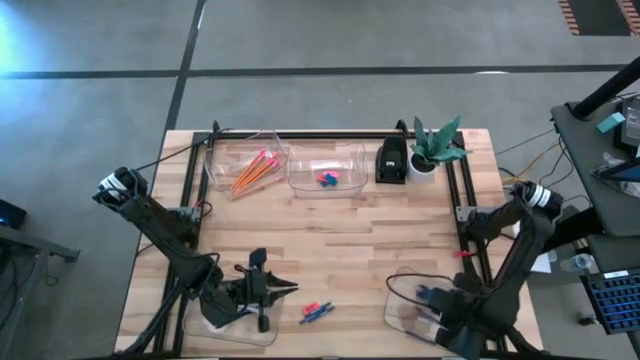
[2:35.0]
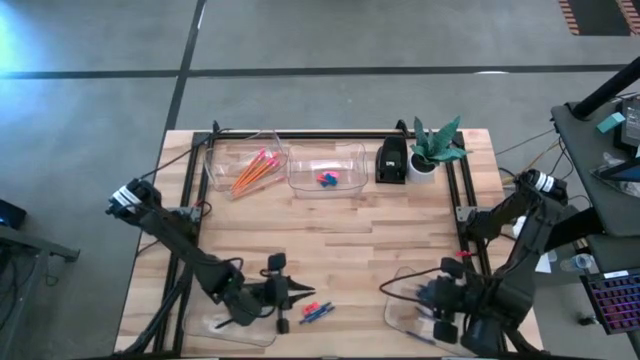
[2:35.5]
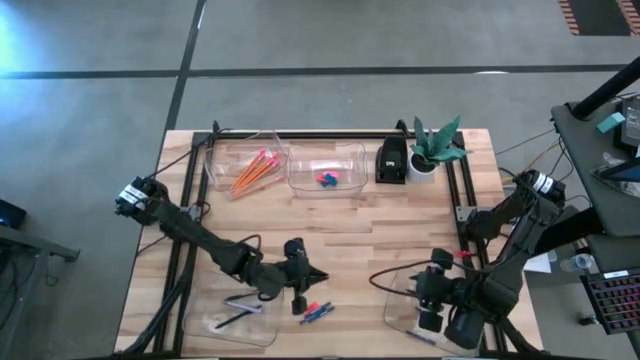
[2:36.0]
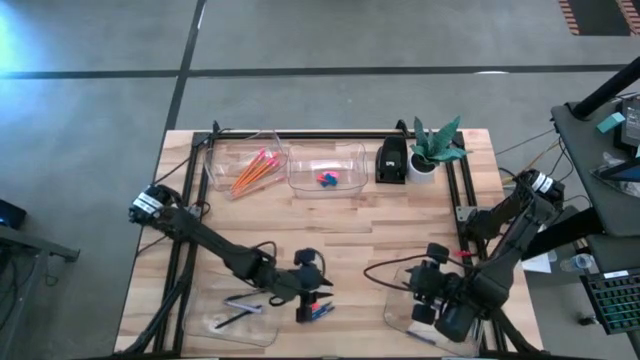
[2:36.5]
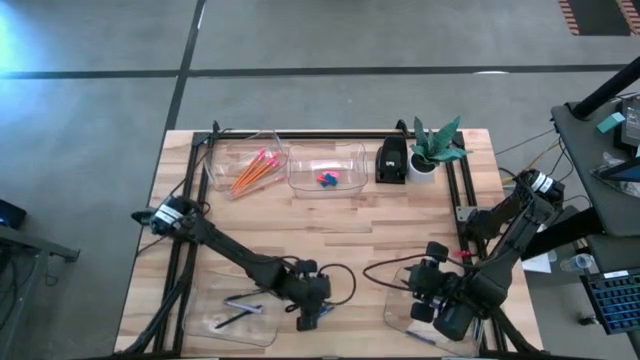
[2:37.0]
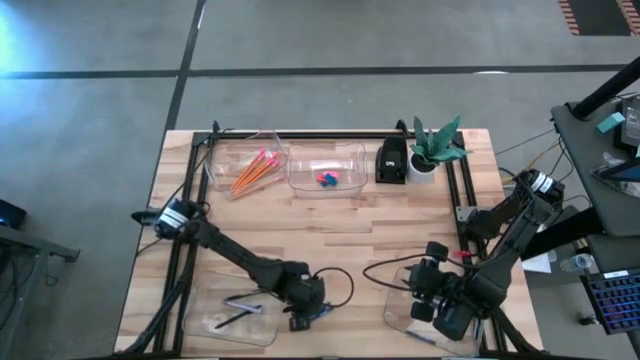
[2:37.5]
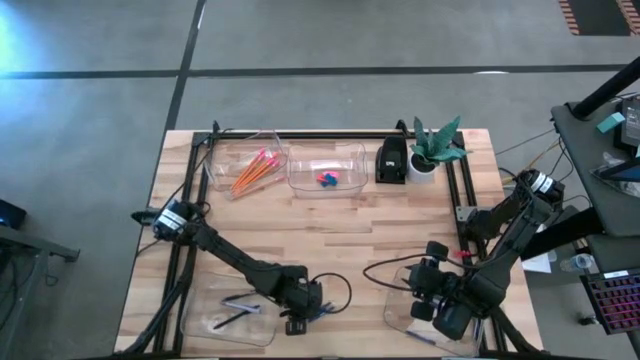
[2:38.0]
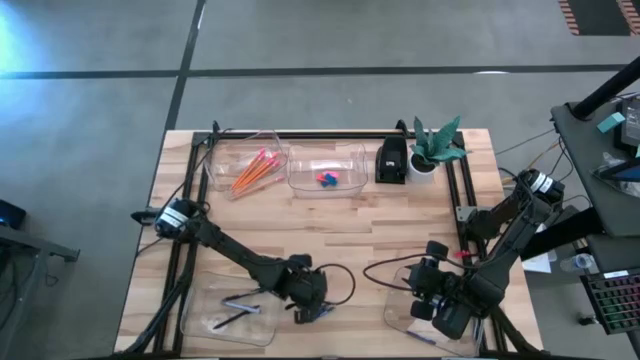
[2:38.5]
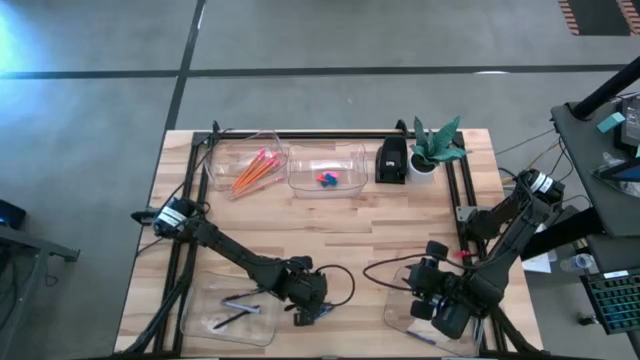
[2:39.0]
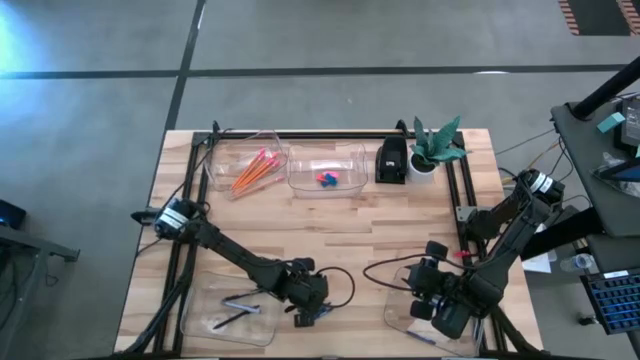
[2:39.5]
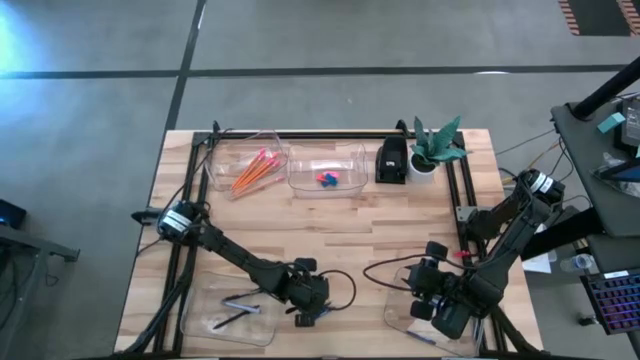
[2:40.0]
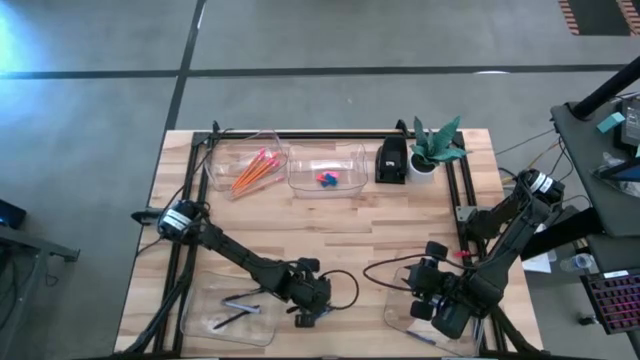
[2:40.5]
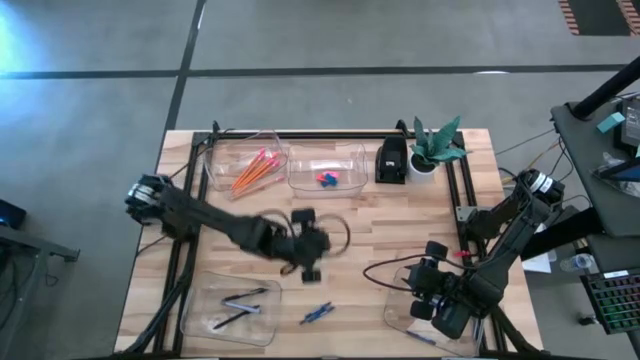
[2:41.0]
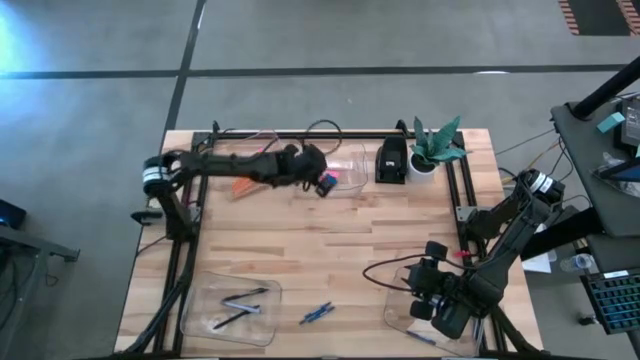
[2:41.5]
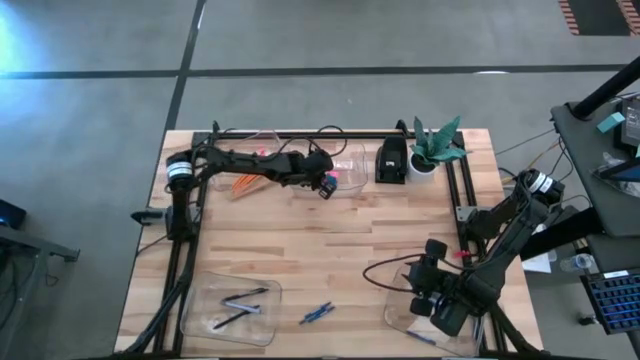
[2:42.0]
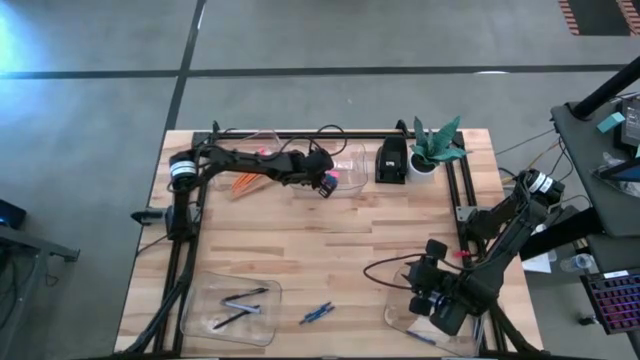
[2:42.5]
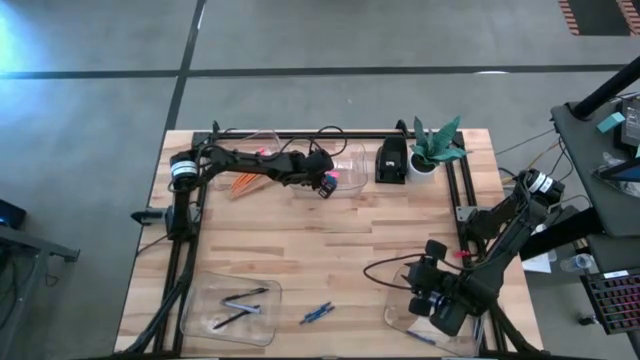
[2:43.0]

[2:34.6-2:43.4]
Task: Sort crayons/erasers/pens/pencils in bins
Put the orange eraser into the top right transparent bin

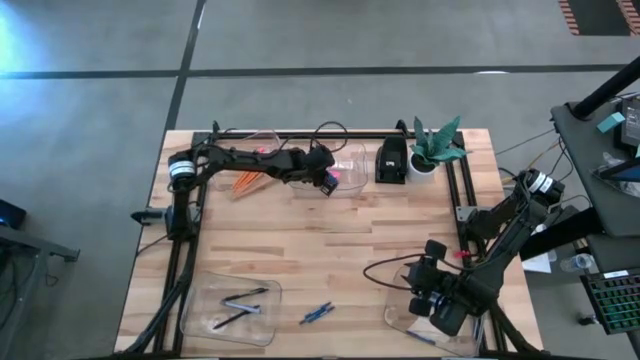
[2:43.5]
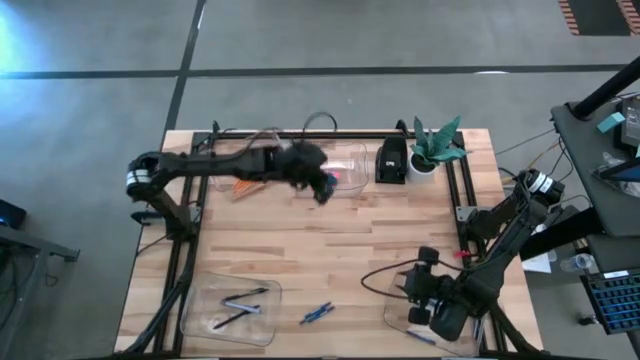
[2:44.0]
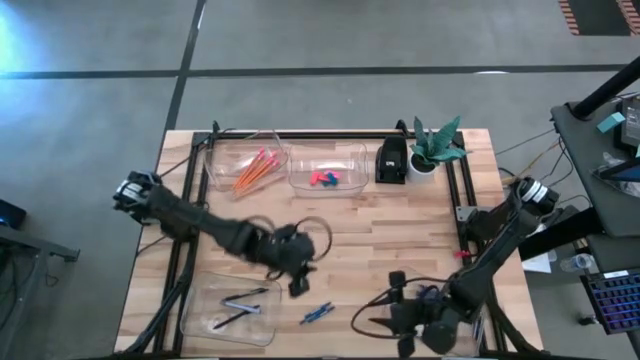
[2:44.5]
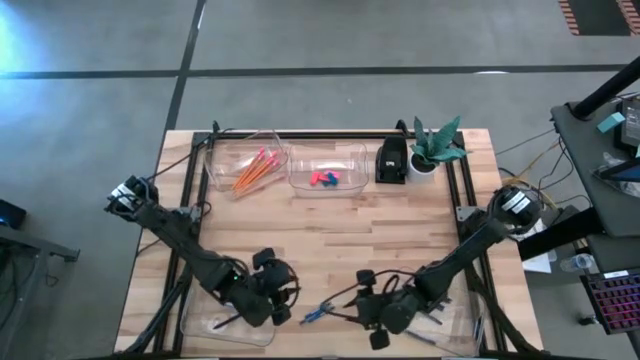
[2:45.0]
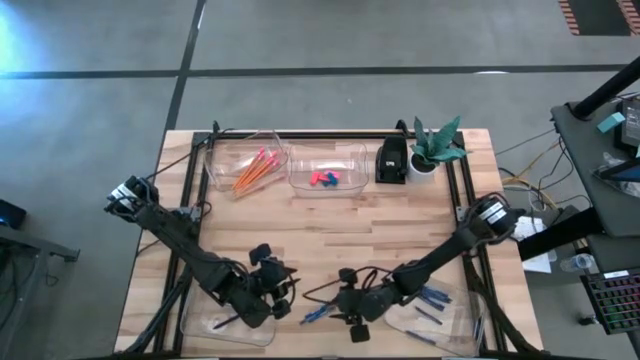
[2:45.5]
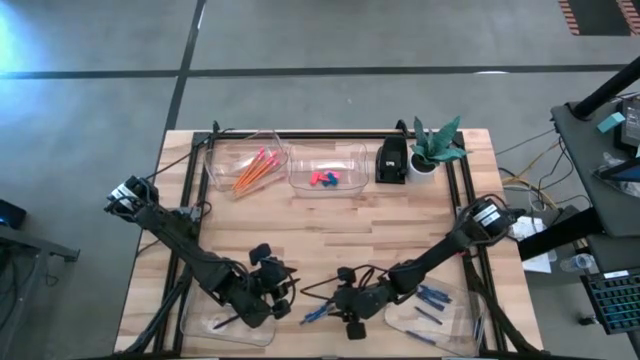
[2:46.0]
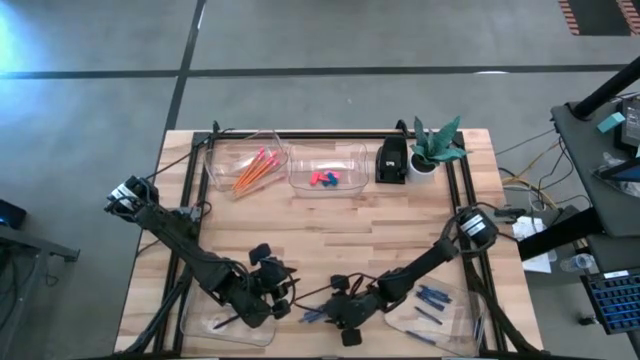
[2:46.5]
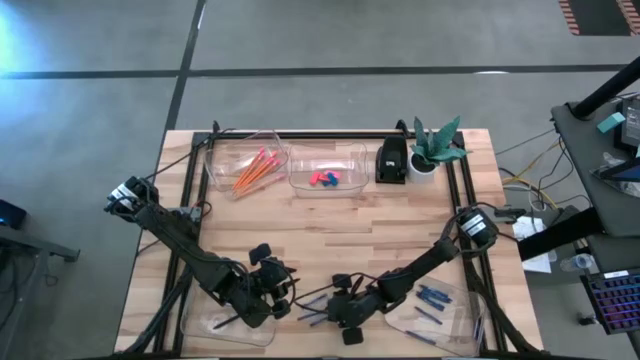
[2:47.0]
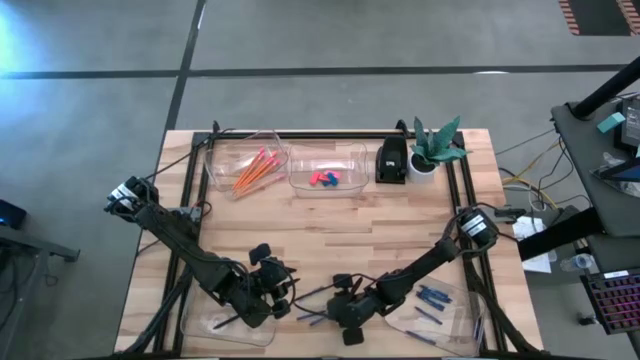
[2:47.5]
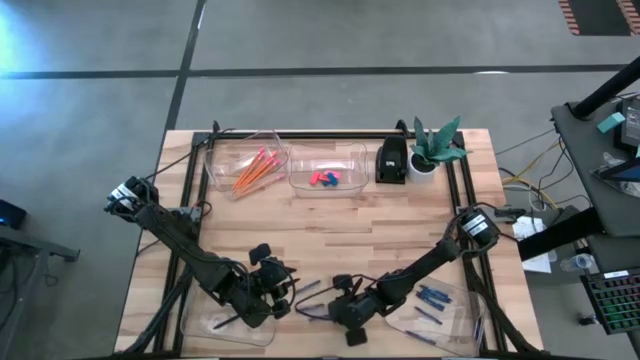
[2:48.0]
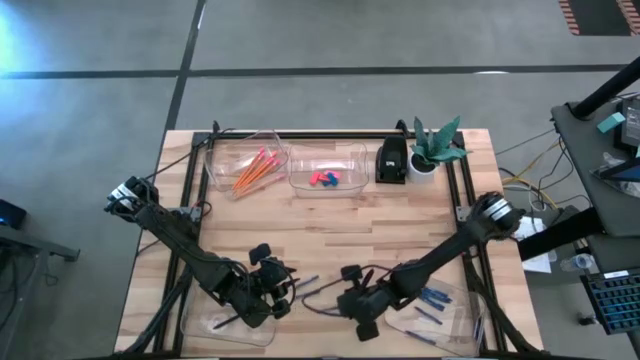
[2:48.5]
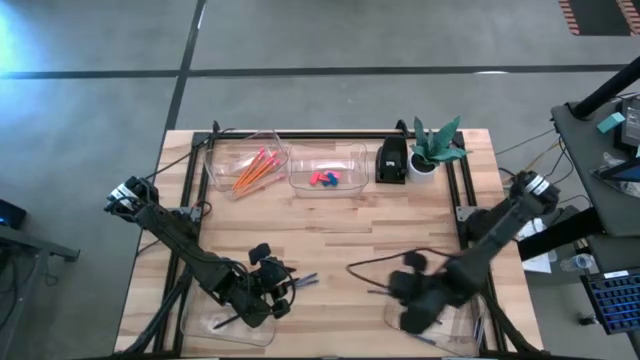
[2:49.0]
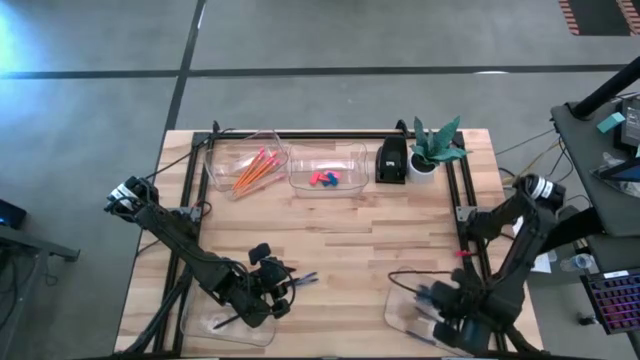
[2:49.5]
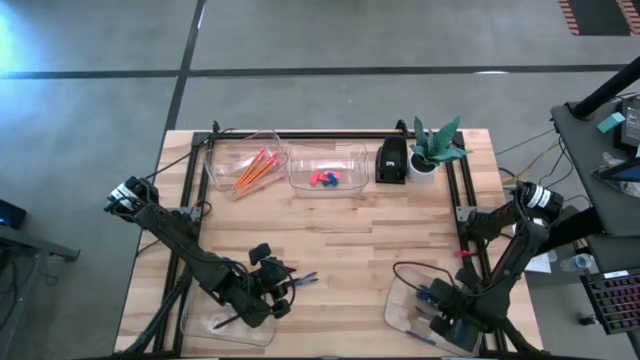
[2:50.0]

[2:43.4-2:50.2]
Put the dark blue crayon into the bottom right transparent bin

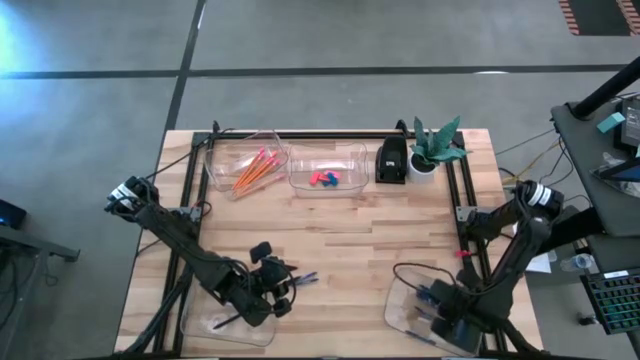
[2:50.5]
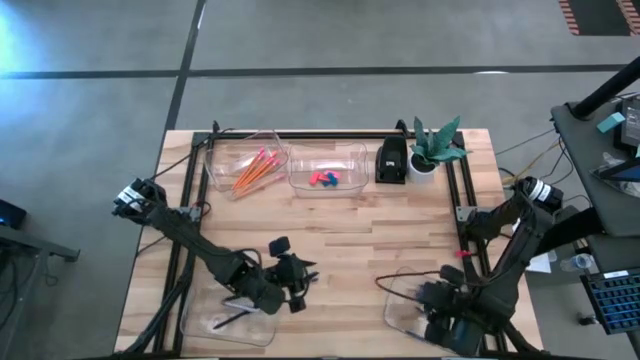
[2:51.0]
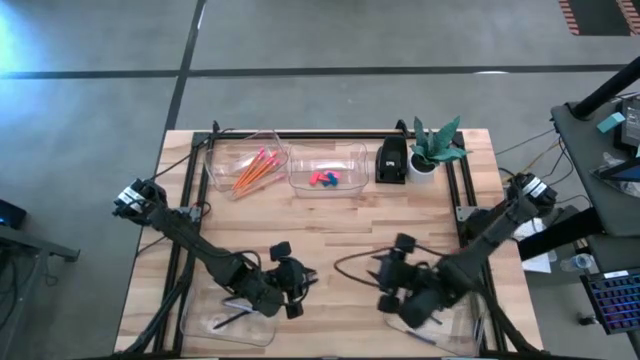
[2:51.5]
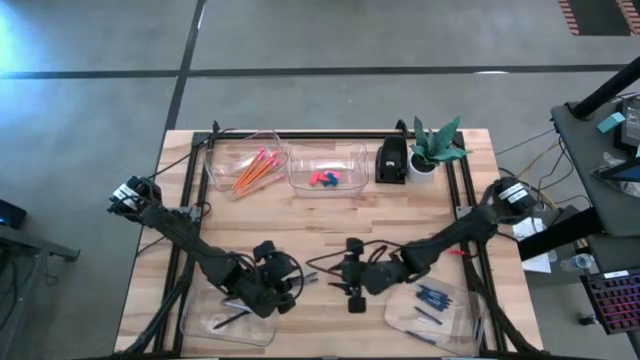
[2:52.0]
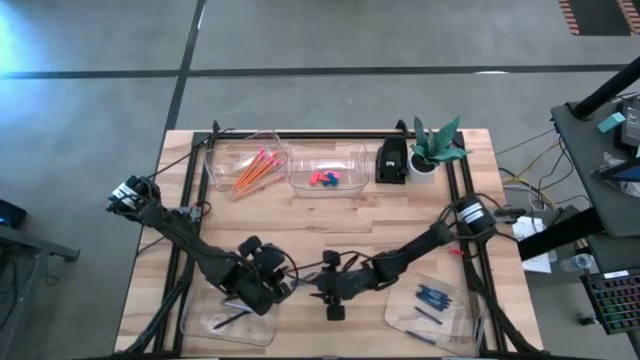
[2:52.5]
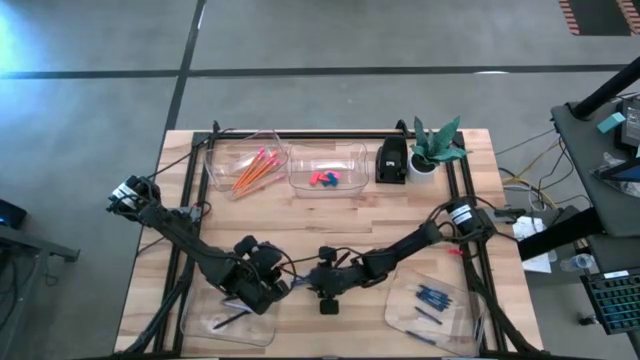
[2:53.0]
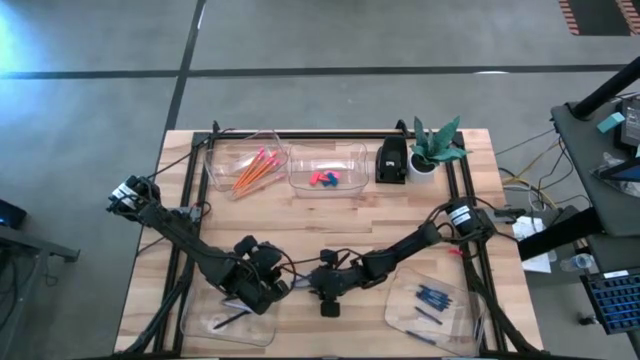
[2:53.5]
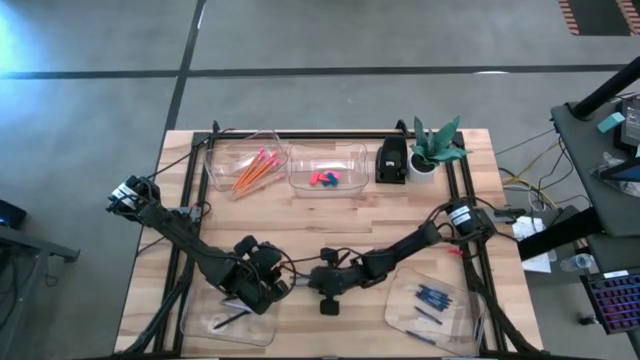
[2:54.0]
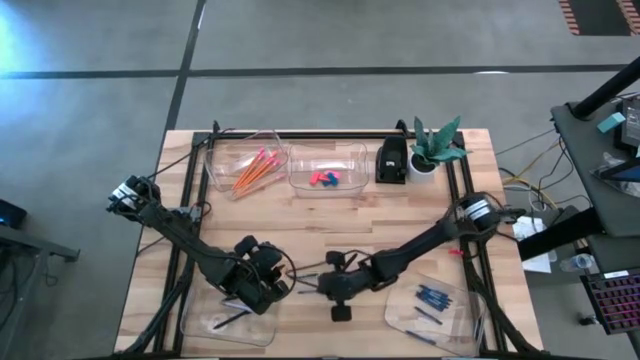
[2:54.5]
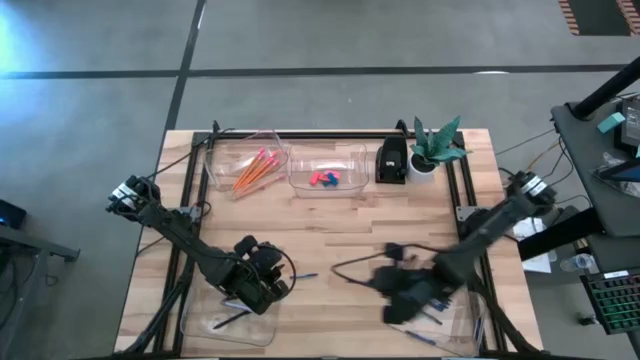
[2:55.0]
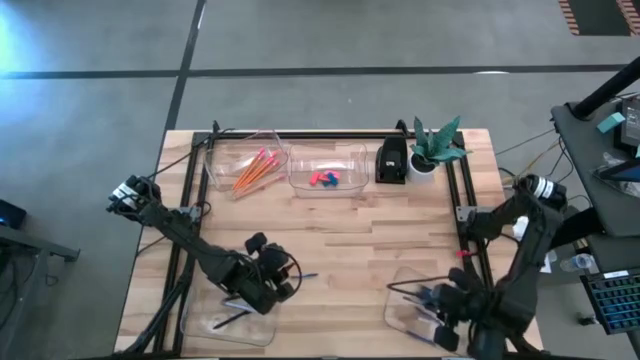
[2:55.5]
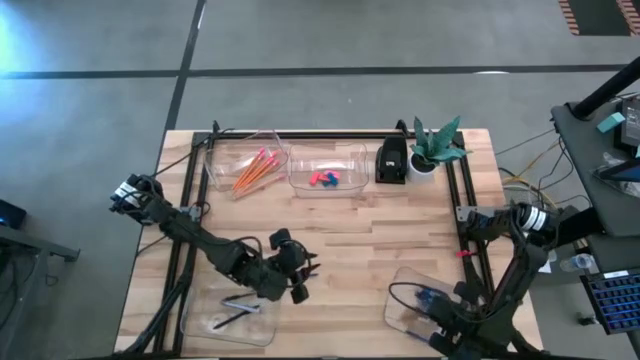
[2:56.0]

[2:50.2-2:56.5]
Put the dark blue crayon into the bottom right transparent bin
